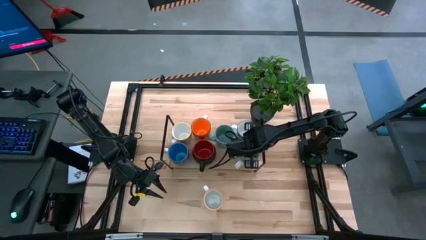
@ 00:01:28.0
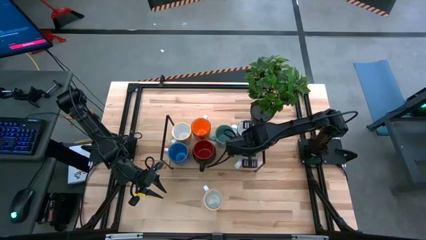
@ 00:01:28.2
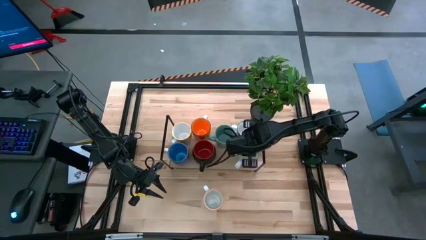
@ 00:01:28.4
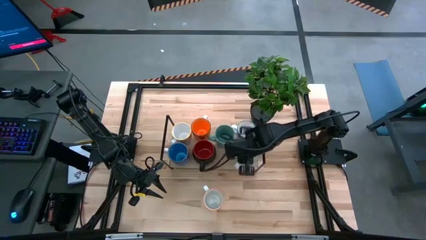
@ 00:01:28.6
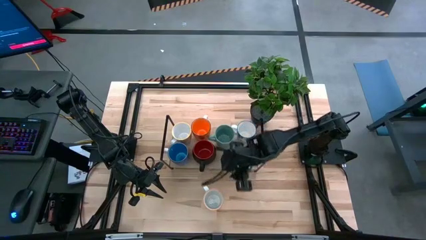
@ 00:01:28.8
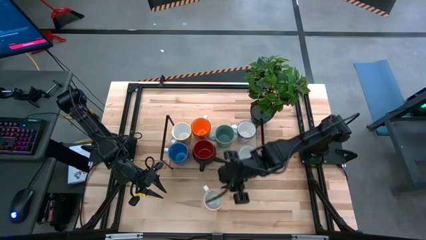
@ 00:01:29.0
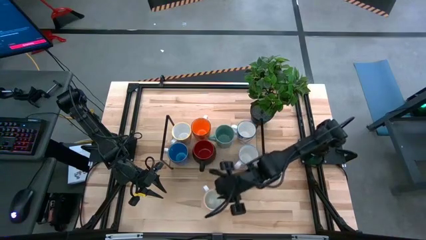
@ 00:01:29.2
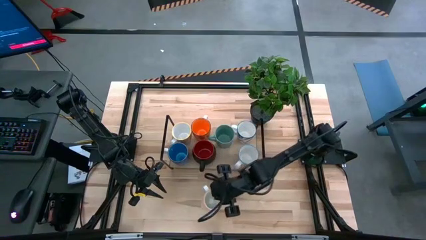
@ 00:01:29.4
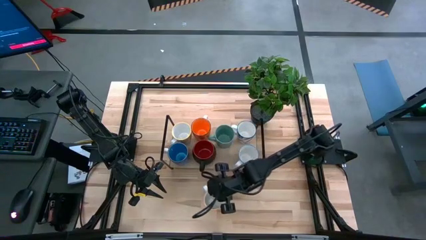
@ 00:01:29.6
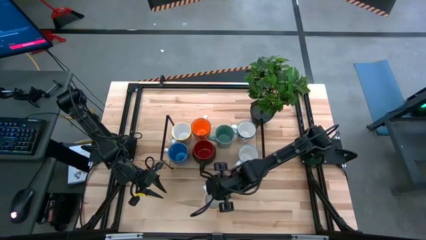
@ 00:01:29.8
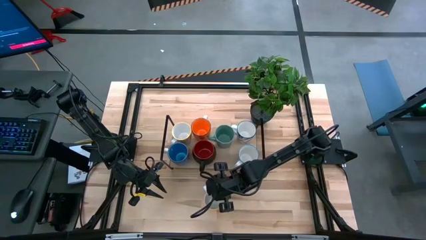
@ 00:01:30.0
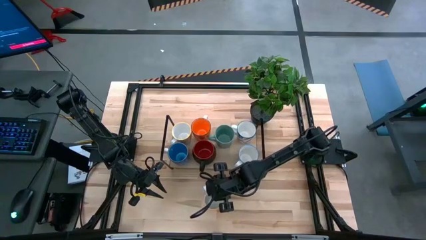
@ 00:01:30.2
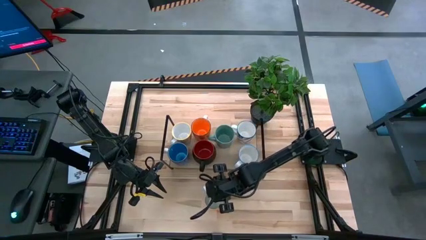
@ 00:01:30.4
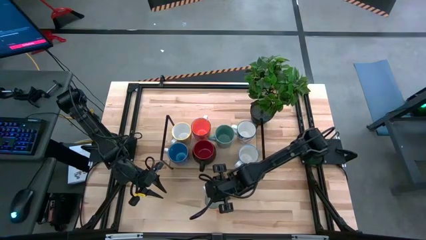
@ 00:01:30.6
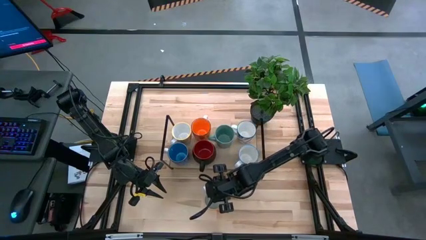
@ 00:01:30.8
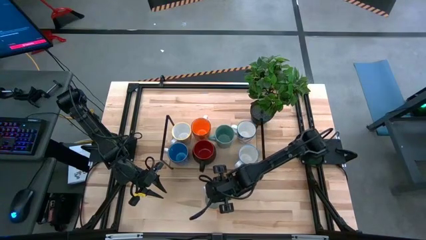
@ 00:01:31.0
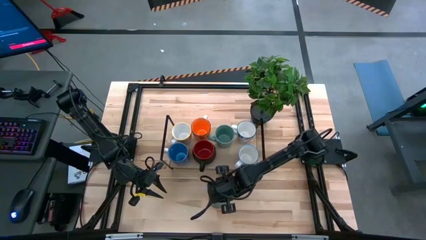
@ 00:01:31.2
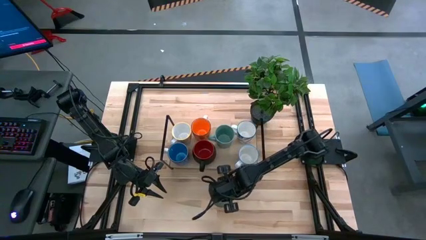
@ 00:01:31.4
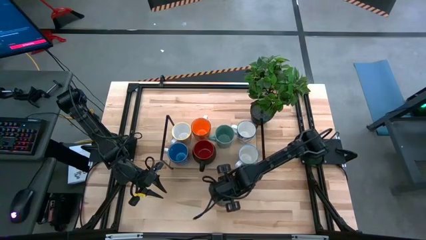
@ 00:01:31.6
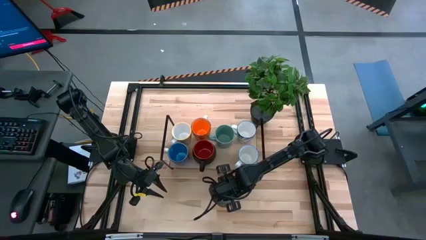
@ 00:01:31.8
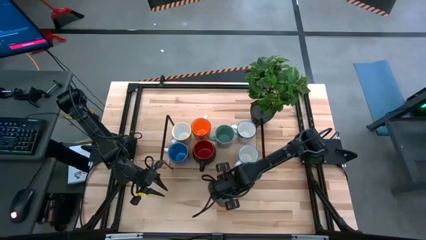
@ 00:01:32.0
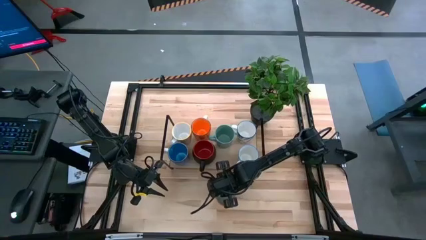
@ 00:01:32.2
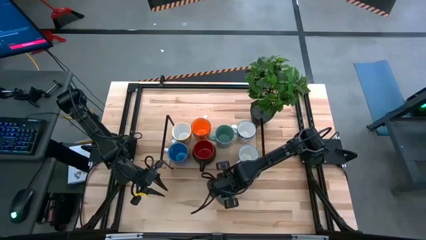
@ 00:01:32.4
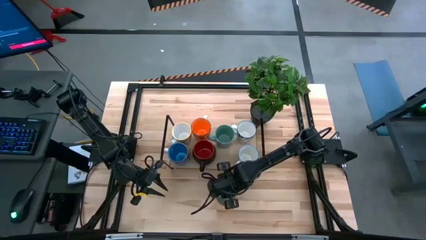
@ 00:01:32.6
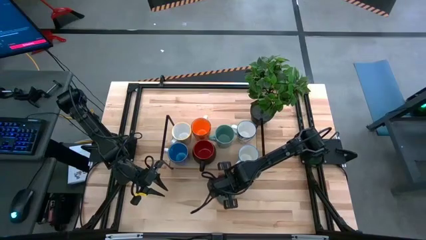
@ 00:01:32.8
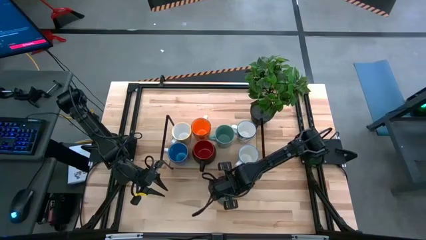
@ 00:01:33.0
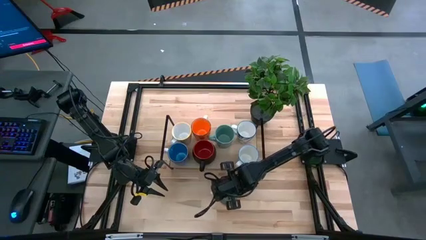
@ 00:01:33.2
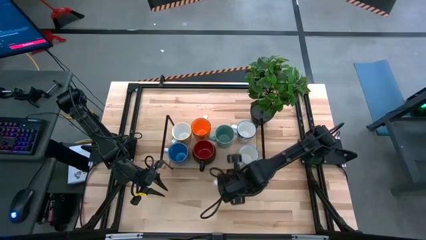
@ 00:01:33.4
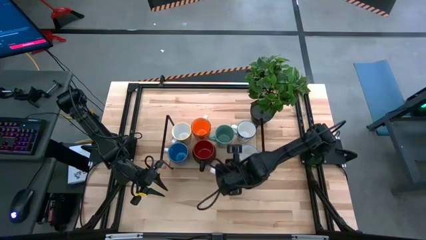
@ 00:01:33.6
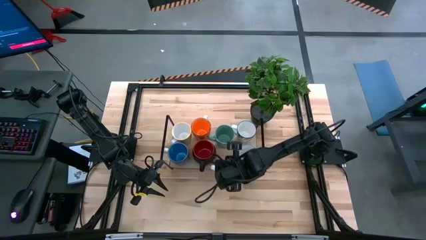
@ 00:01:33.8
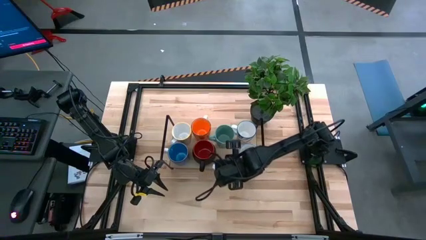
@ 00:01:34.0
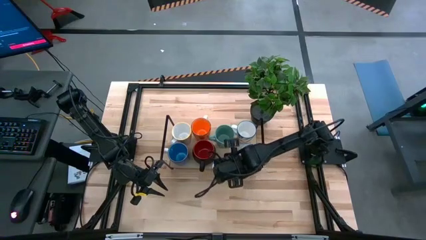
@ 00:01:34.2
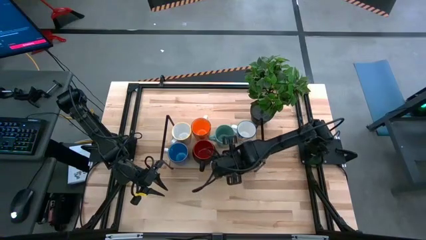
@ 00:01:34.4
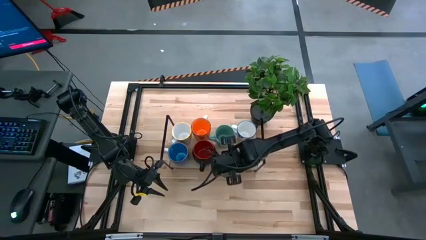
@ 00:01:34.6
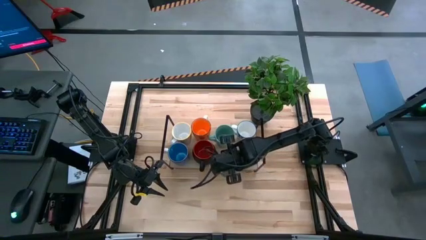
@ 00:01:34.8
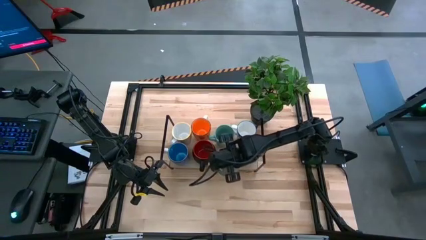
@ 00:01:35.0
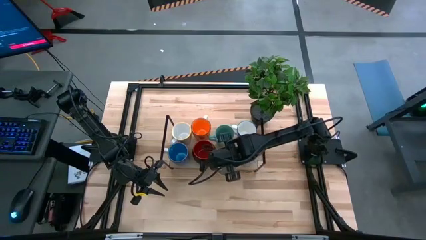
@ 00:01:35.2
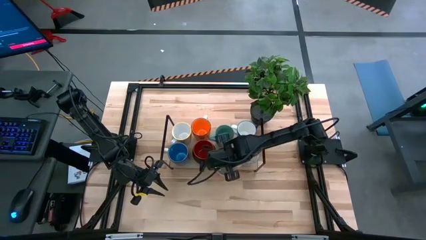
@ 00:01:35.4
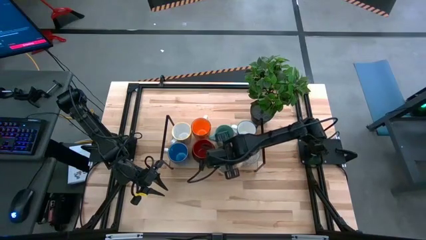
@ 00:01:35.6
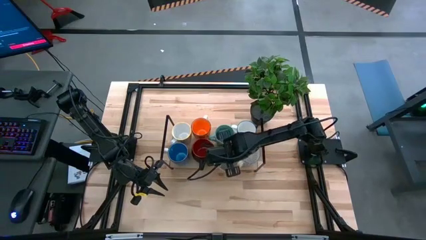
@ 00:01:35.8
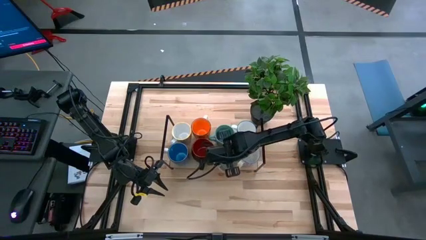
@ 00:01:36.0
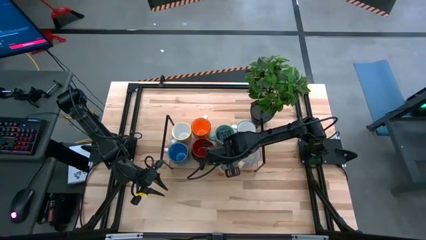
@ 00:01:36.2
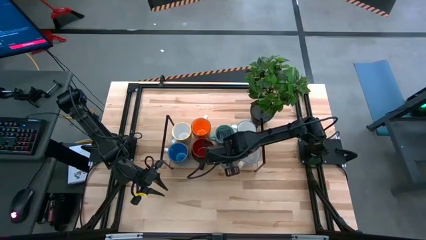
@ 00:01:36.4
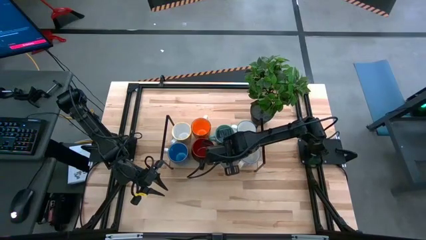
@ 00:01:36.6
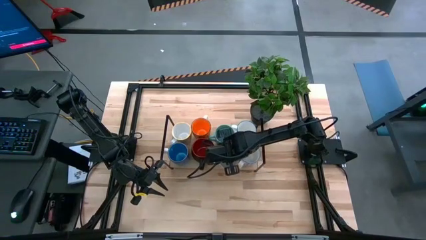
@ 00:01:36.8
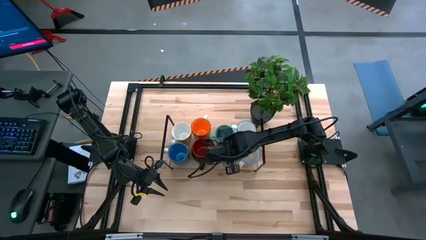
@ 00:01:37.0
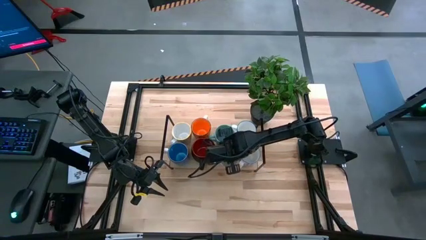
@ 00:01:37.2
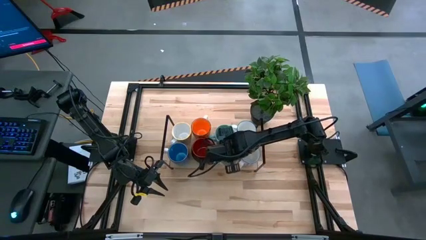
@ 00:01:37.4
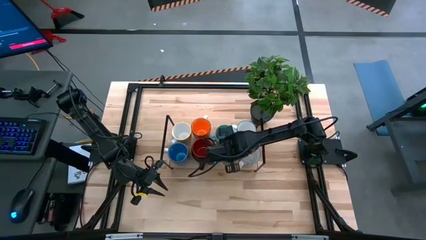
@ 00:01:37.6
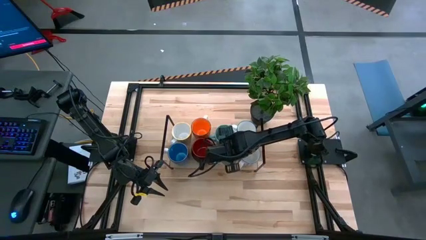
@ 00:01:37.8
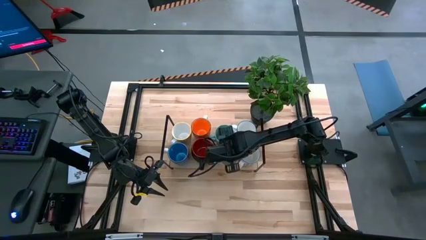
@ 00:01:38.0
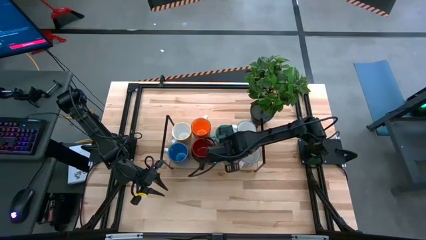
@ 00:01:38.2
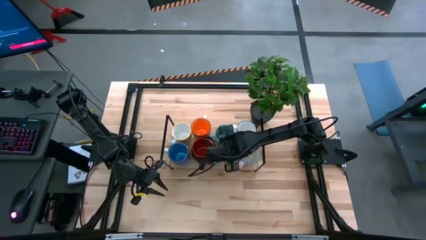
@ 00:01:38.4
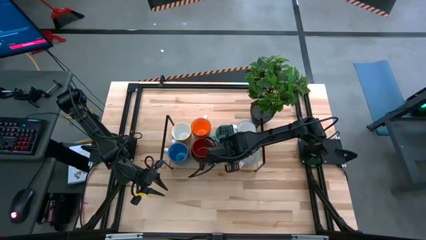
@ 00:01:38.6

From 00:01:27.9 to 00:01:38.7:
Task: Place coffee mugs
Put the yellow and white patterned mug on the shelf
